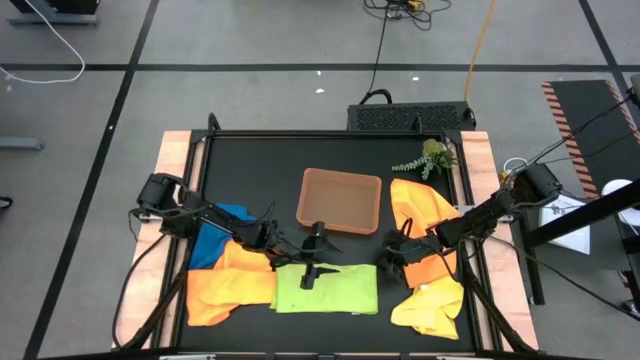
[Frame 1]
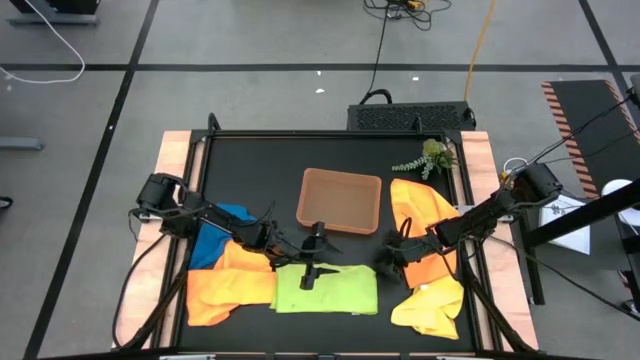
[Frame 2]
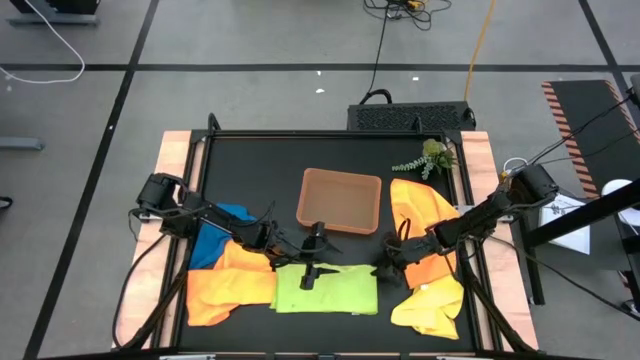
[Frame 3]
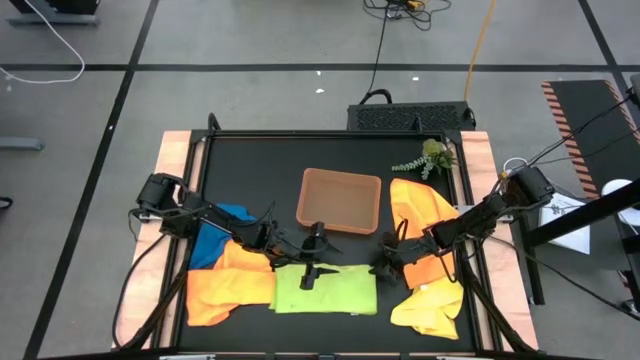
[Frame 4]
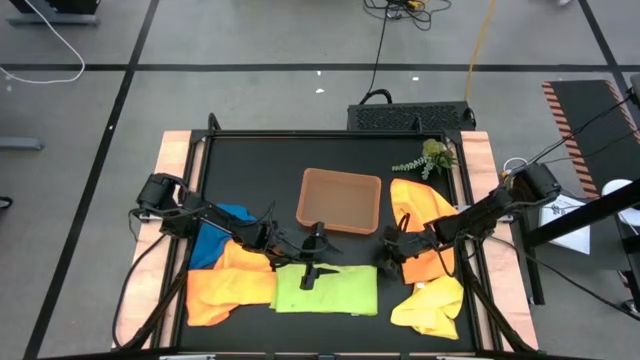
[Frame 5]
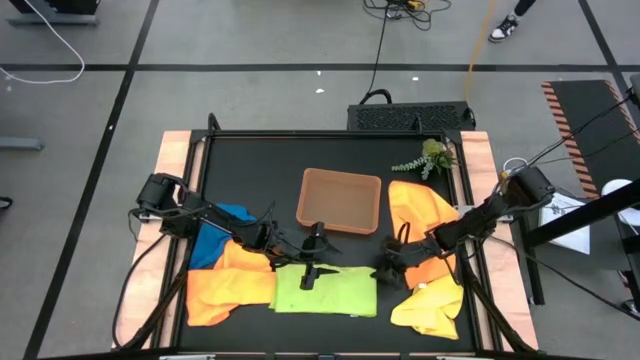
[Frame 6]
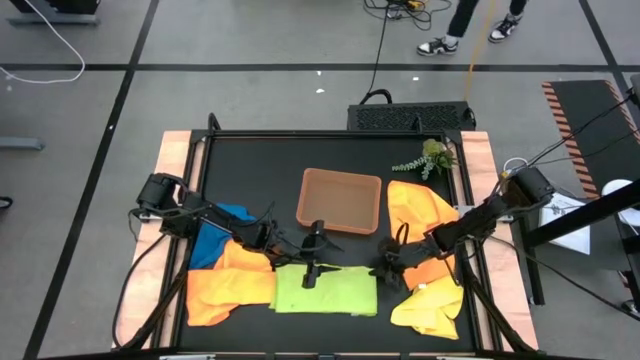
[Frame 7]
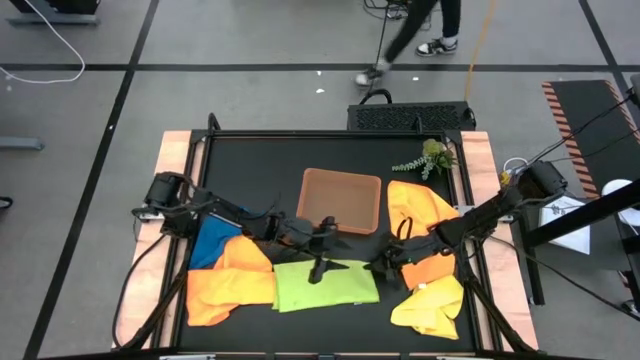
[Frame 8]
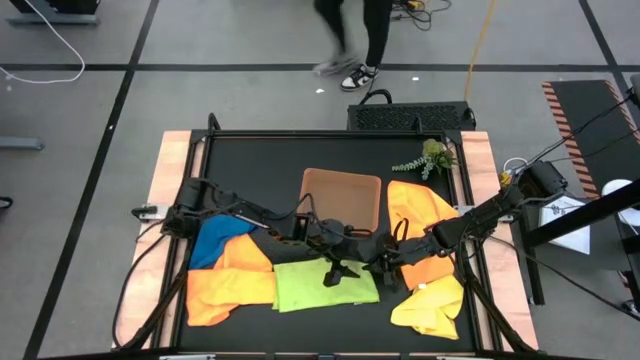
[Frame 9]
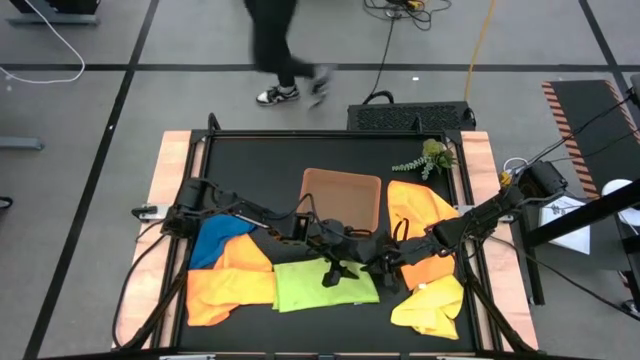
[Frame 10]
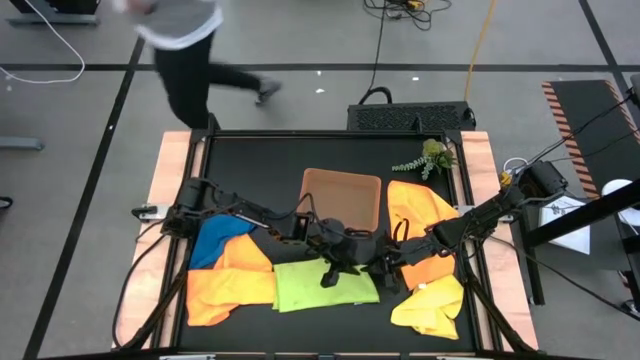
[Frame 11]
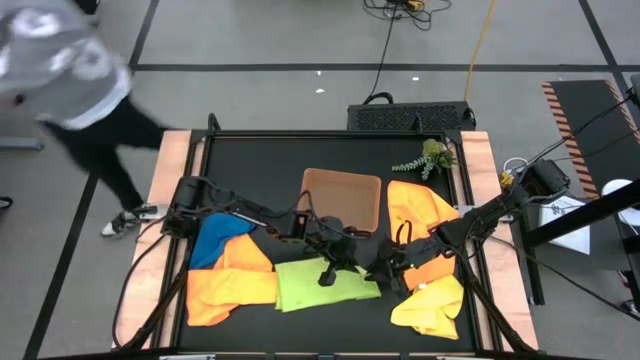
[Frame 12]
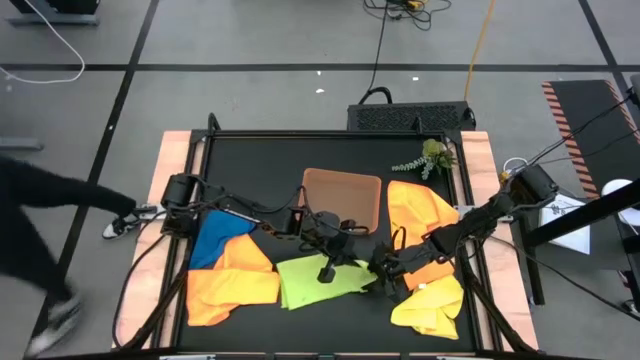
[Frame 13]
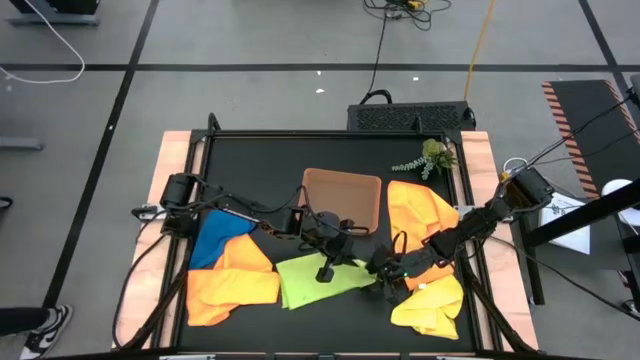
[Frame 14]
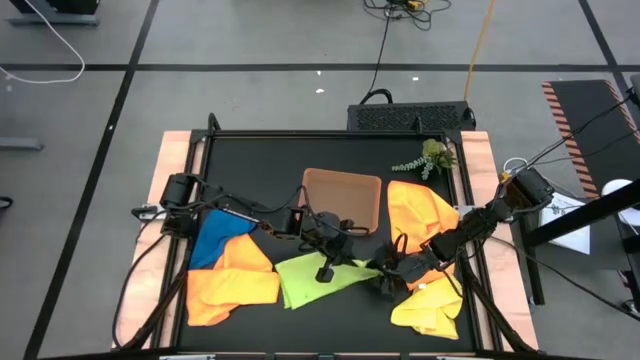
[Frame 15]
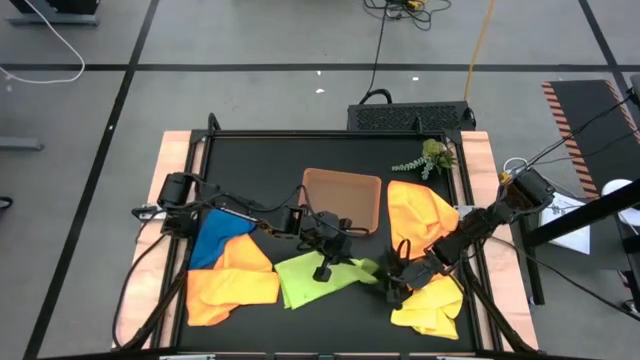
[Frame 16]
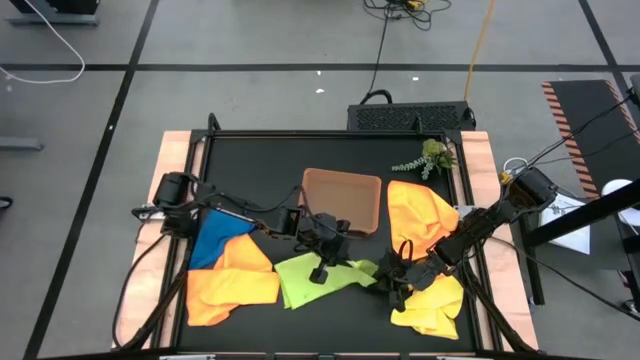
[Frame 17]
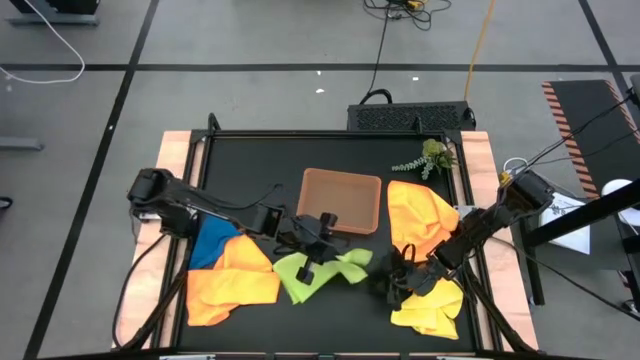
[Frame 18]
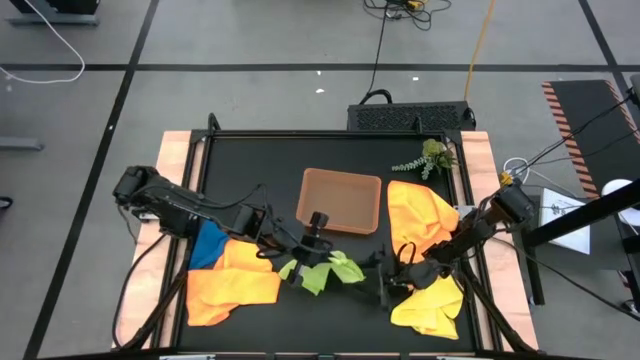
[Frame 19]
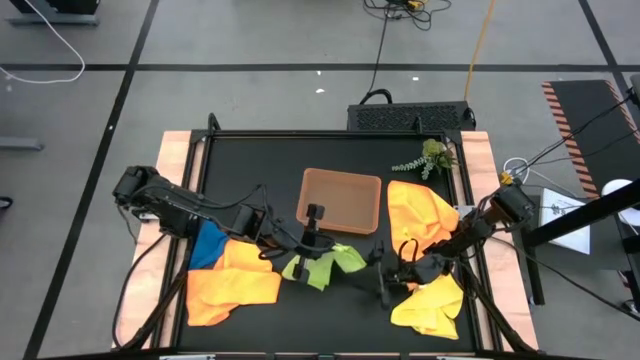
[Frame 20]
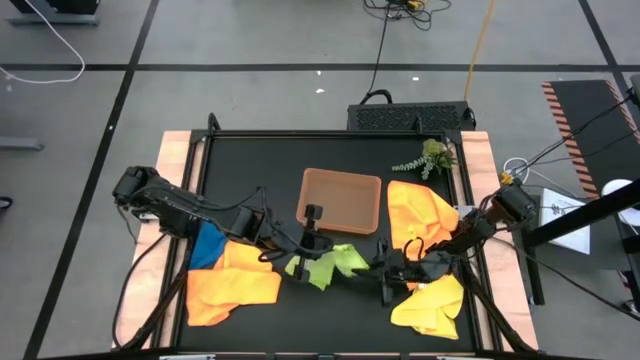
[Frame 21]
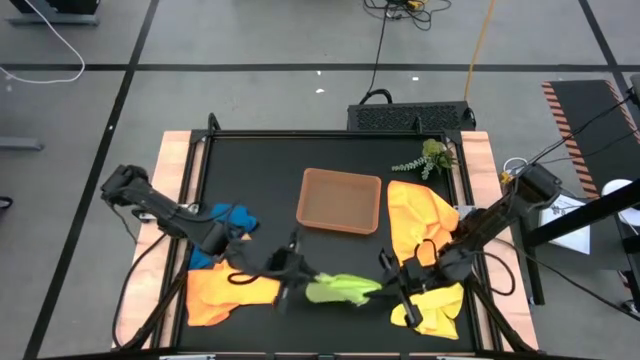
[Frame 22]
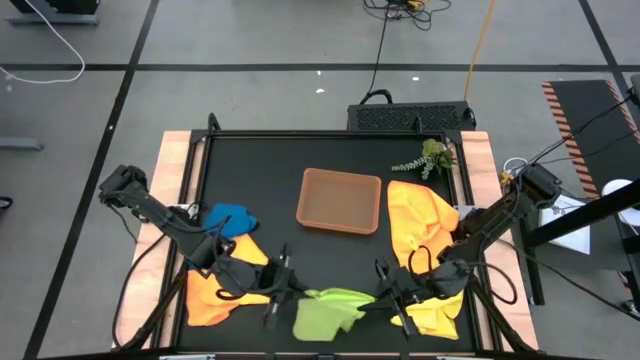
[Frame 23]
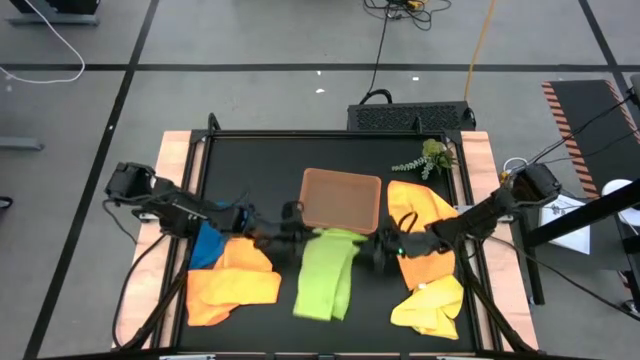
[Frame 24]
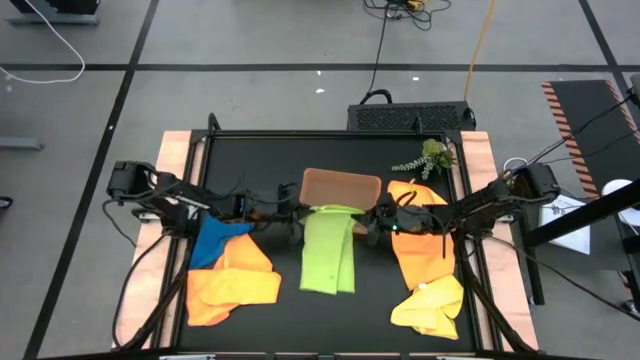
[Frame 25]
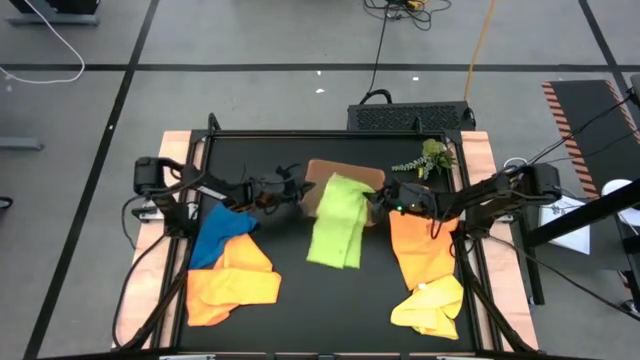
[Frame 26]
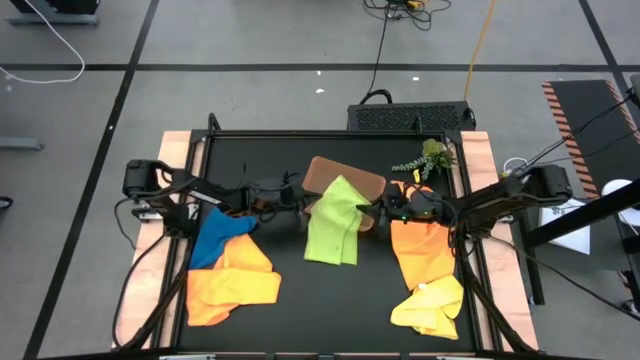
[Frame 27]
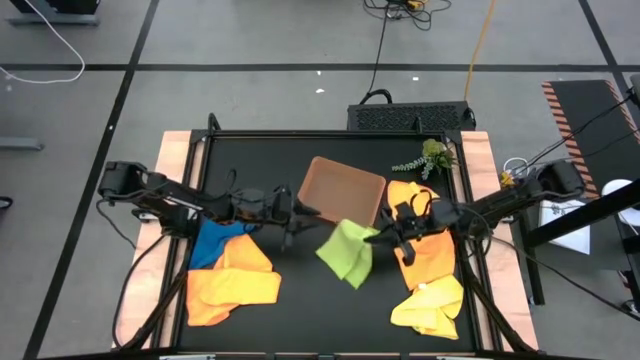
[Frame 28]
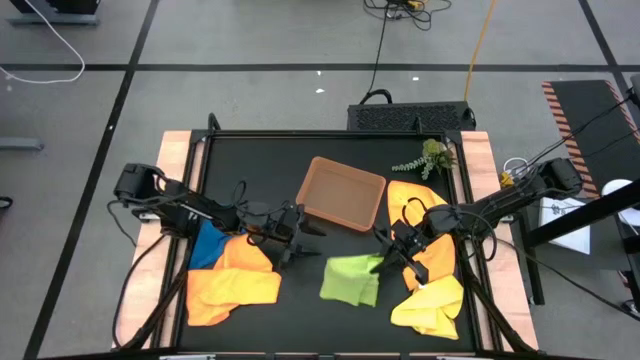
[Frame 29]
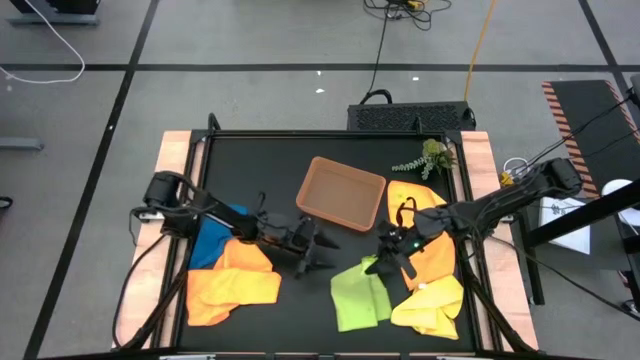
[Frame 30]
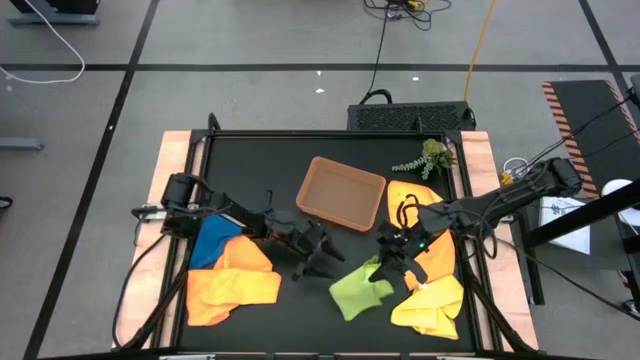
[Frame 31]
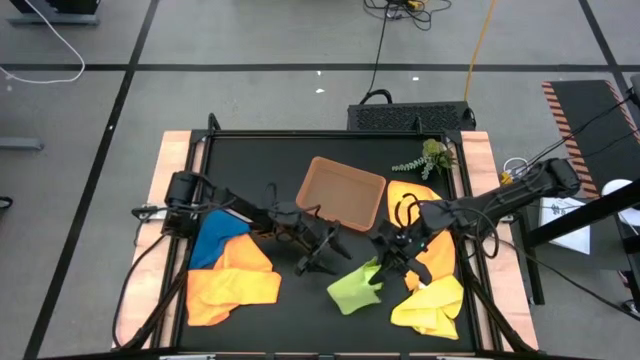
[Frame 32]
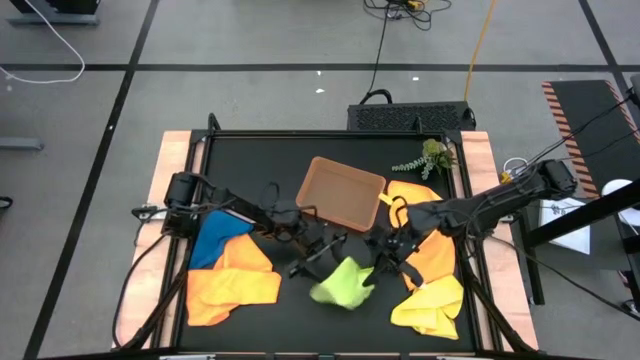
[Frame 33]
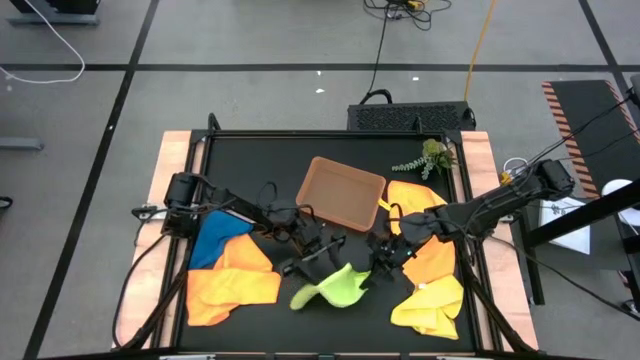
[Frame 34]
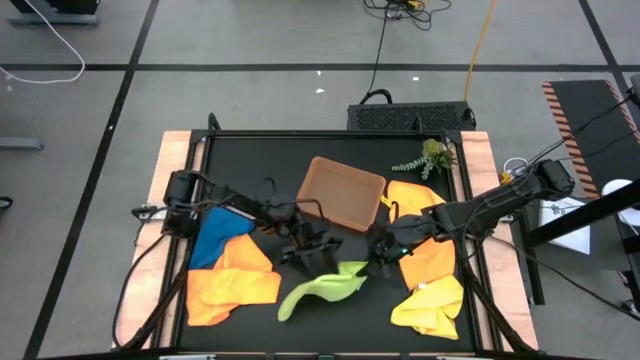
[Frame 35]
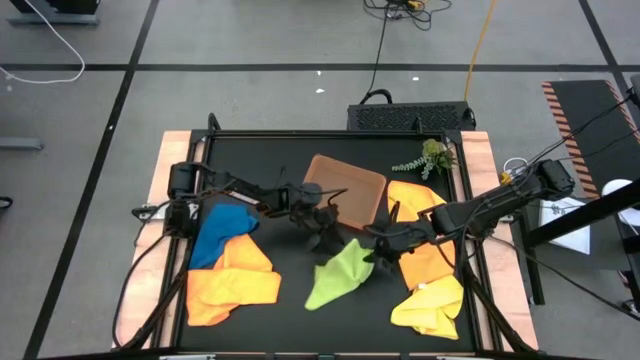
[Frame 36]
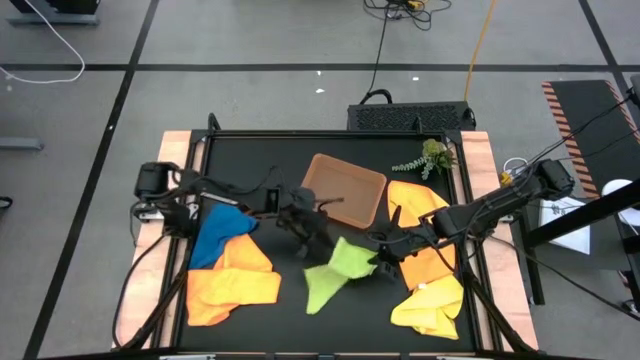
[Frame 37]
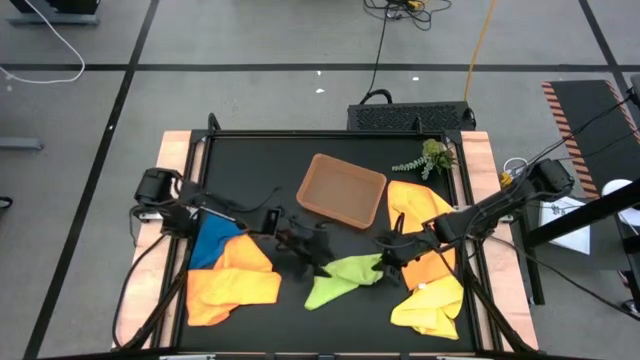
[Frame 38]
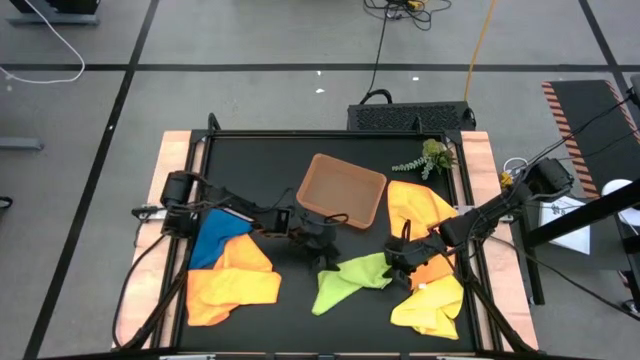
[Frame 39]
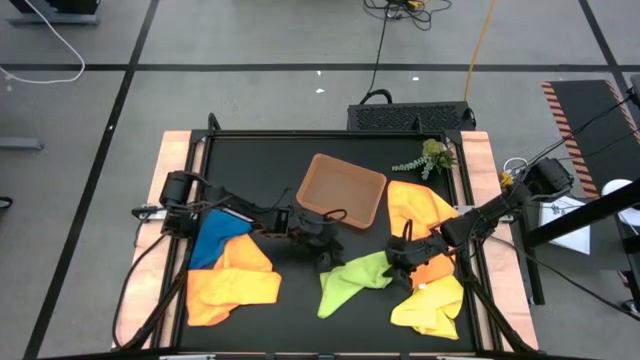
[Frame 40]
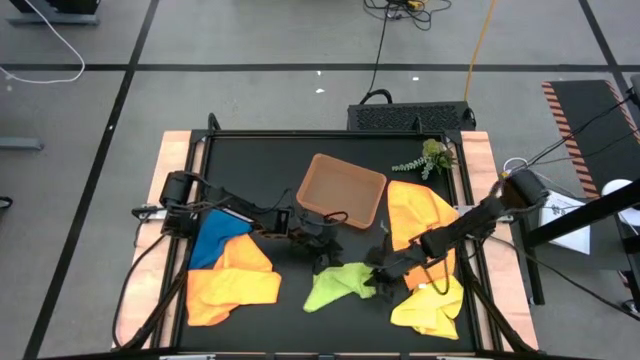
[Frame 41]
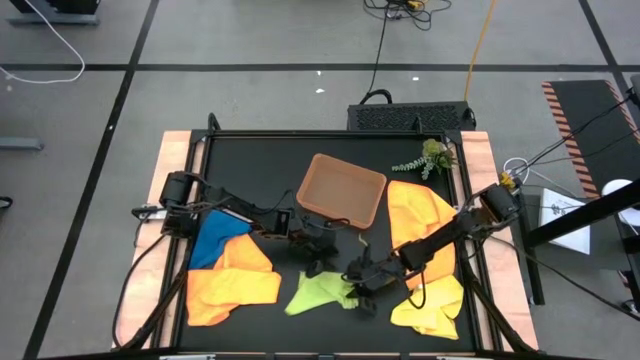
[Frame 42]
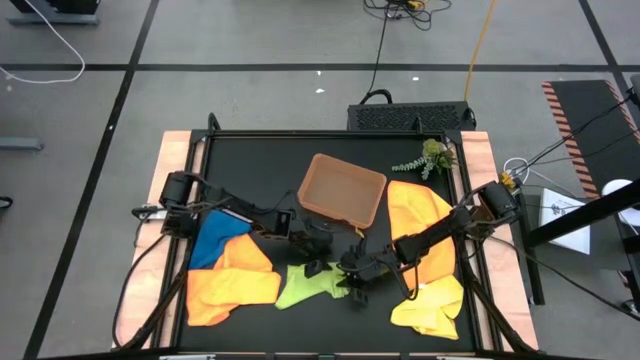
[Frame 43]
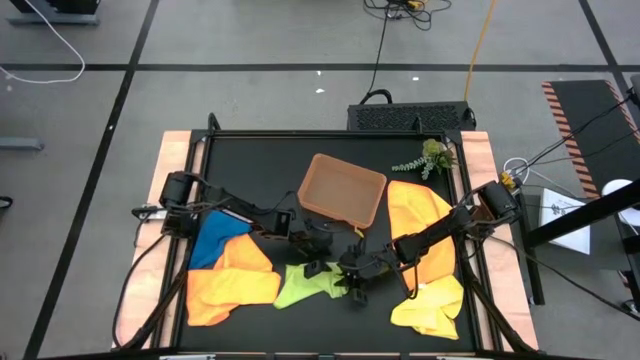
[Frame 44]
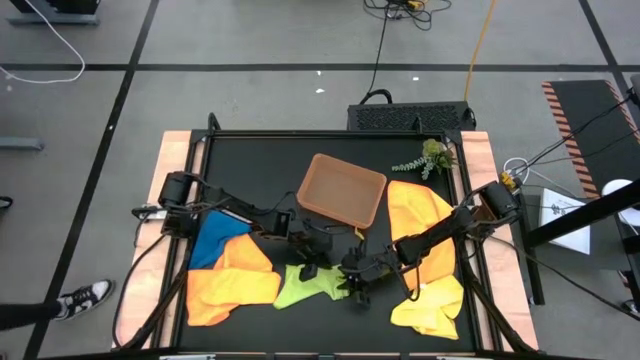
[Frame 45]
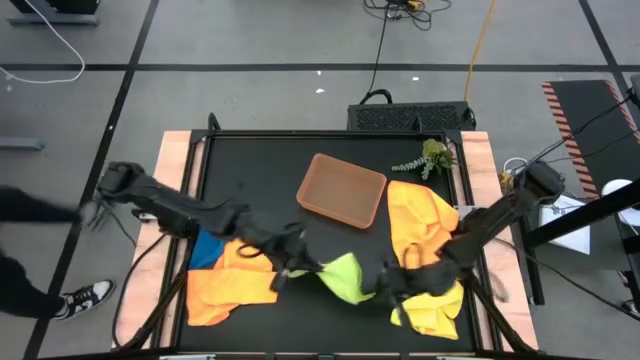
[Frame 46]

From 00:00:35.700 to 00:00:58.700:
Task: Fold microfiber towels
Fold the green microfiber towel
